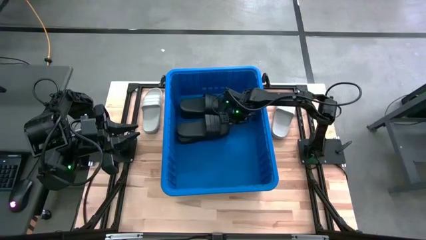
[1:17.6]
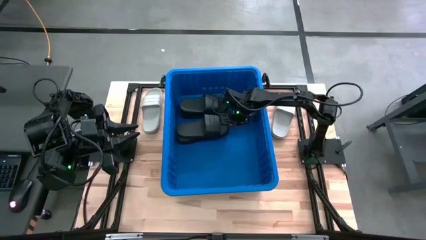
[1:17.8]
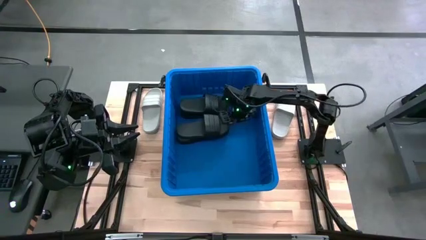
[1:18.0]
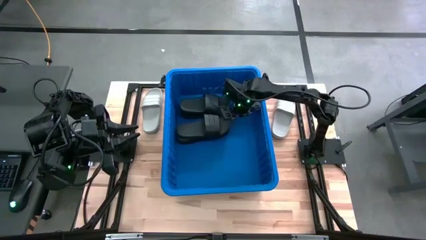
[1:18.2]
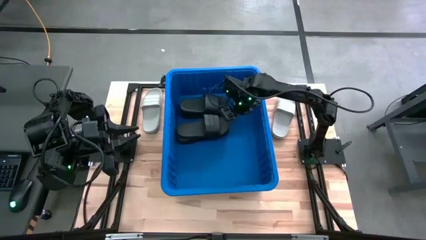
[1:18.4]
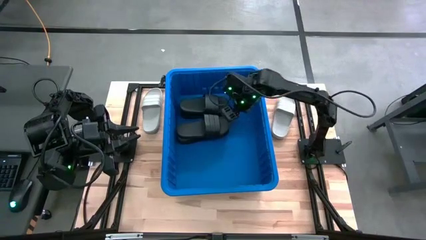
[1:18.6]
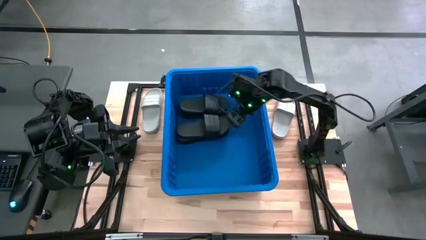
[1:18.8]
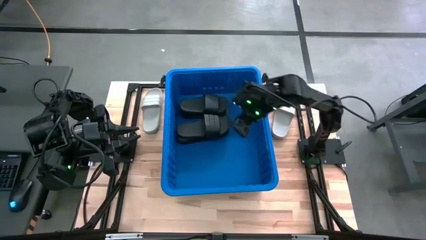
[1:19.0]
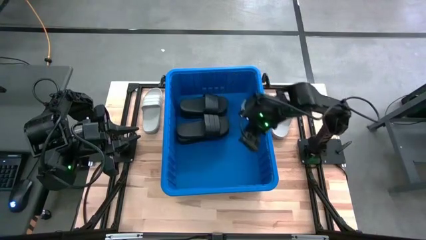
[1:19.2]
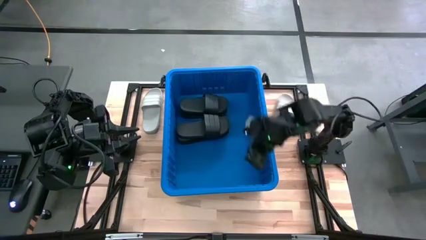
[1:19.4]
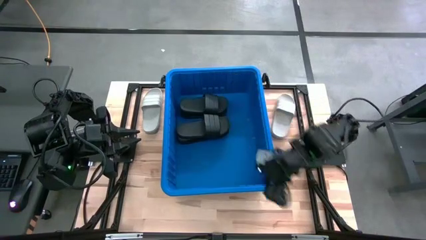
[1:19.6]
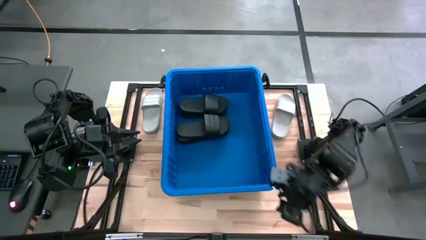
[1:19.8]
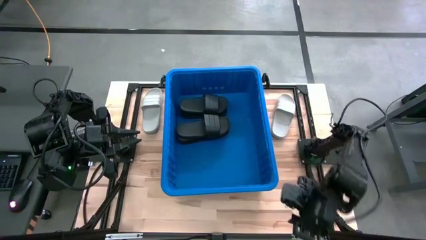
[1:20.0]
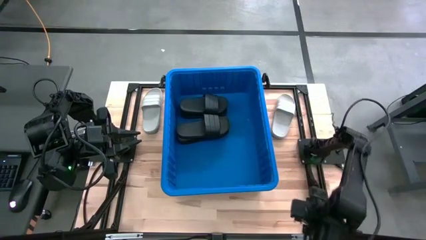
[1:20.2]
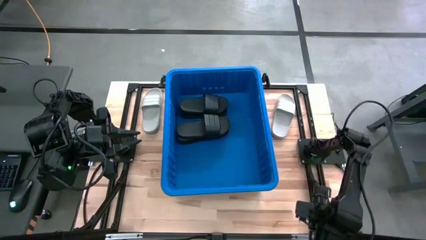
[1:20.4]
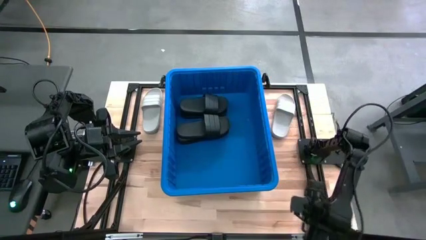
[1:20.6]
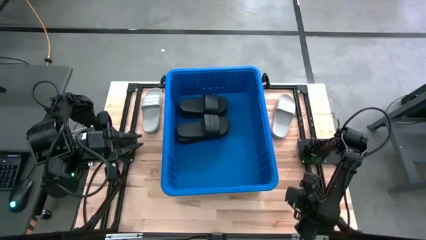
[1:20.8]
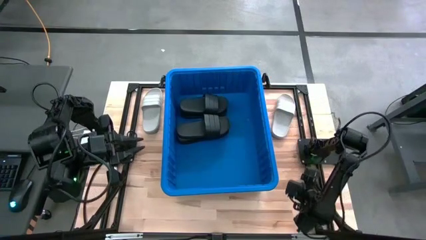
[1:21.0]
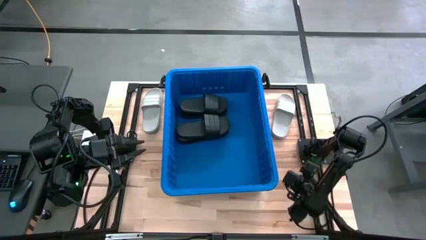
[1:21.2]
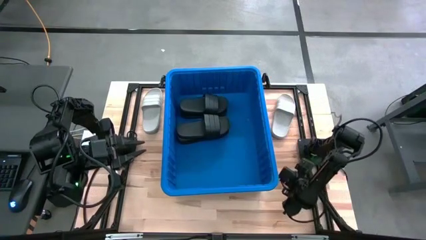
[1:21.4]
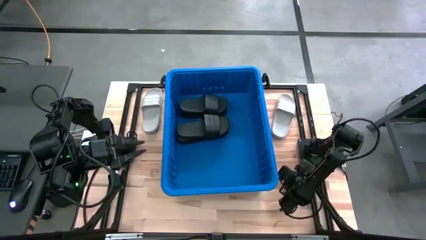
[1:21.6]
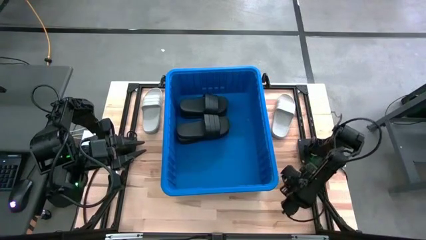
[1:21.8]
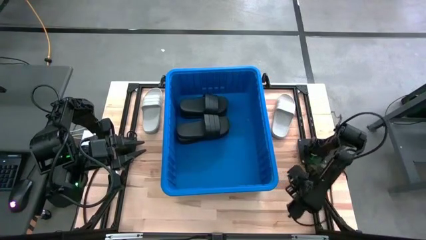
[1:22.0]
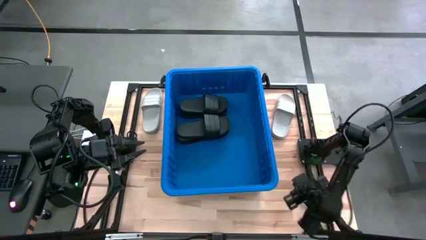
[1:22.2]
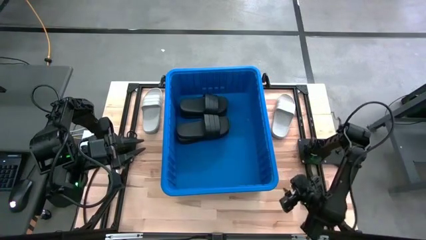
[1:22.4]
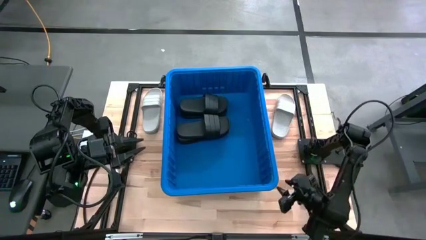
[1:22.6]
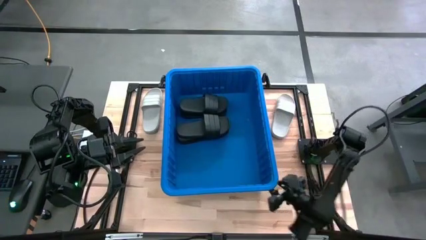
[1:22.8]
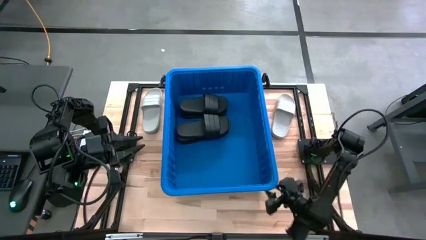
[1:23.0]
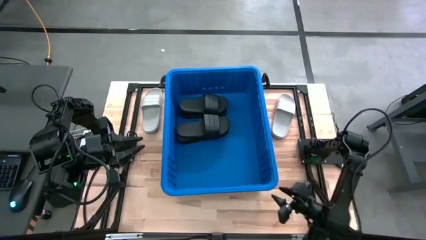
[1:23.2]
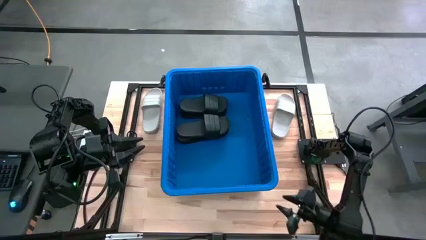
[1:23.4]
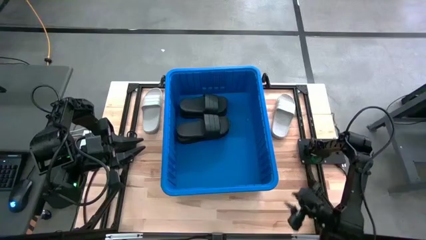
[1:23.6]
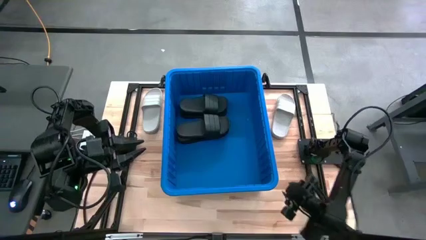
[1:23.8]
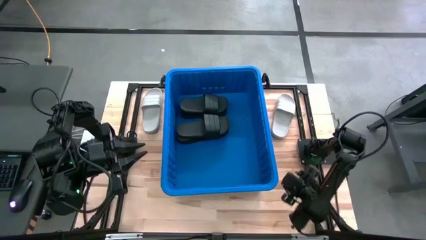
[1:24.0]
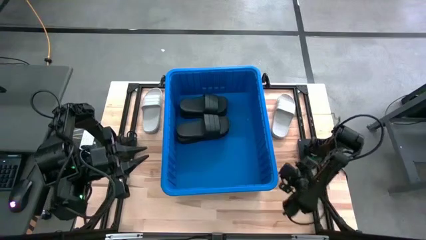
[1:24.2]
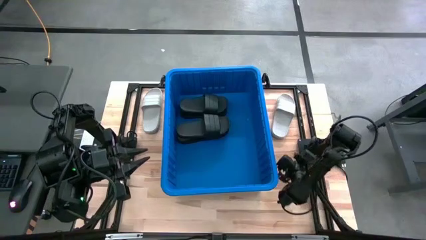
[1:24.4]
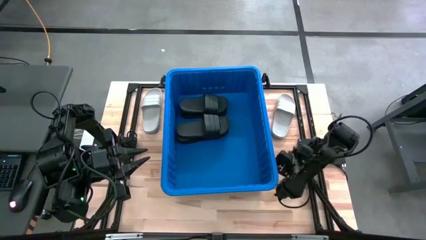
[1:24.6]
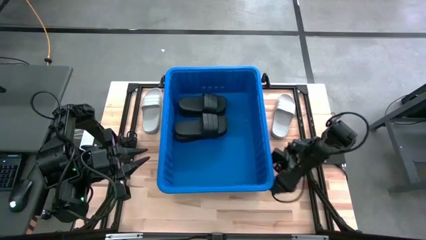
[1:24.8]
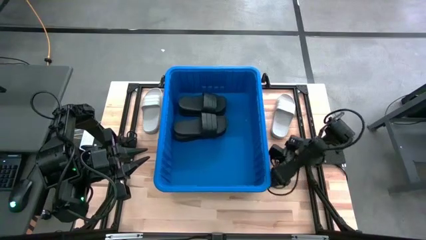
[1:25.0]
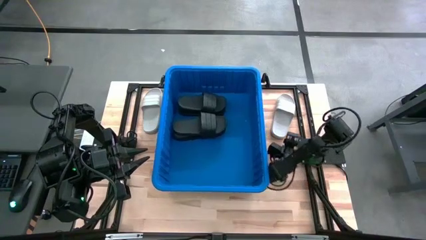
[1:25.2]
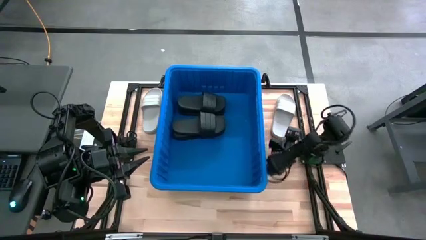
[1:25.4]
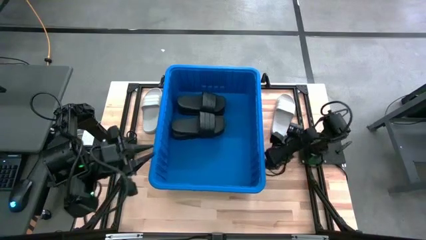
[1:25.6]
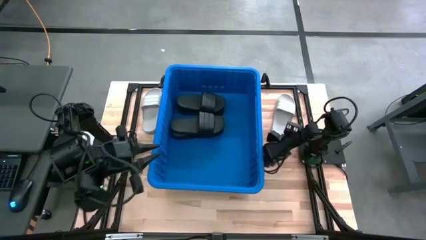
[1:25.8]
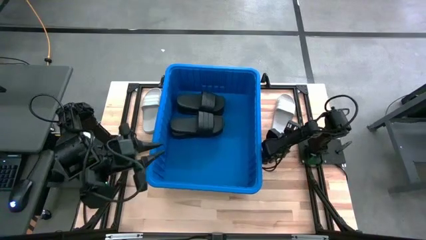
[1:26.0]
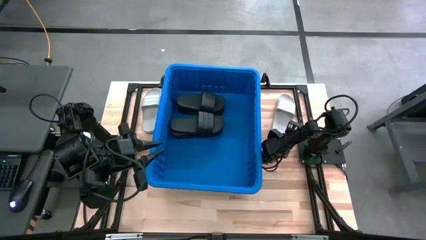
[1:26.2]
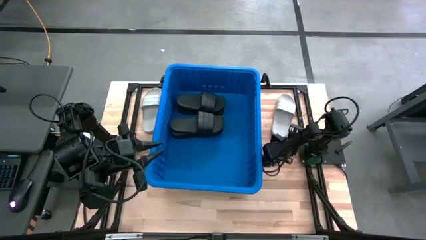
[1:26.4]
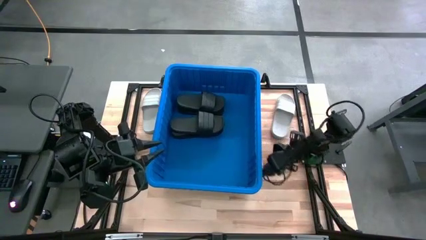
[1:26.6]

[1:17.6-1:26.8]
Task: Pick and place slides into bin
Adjust the bin

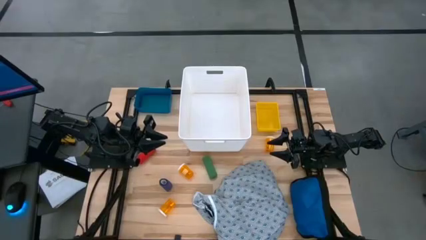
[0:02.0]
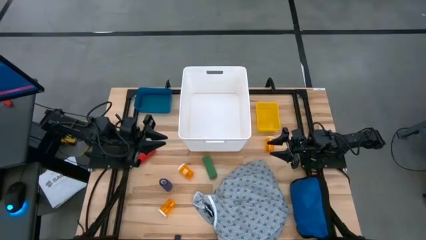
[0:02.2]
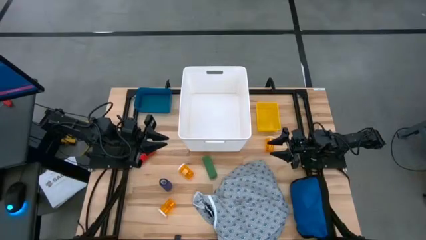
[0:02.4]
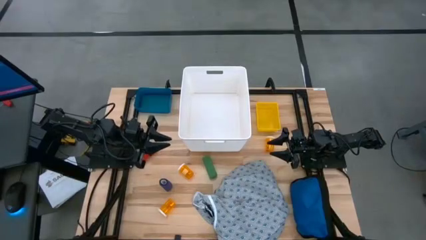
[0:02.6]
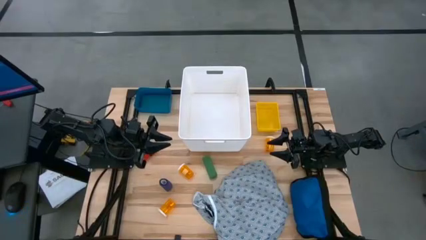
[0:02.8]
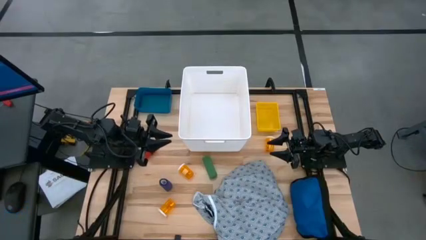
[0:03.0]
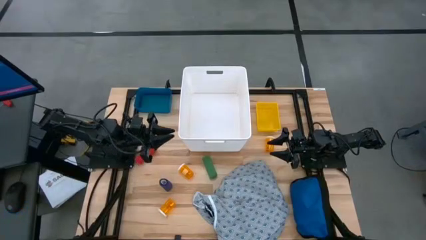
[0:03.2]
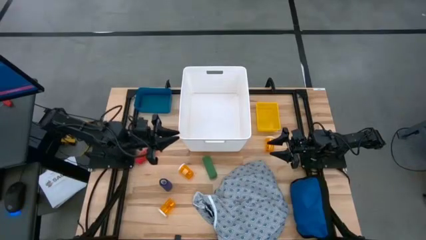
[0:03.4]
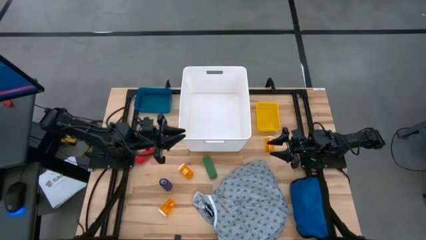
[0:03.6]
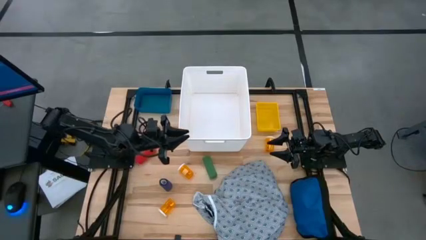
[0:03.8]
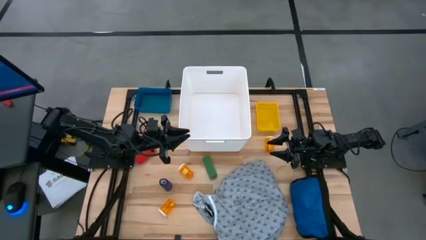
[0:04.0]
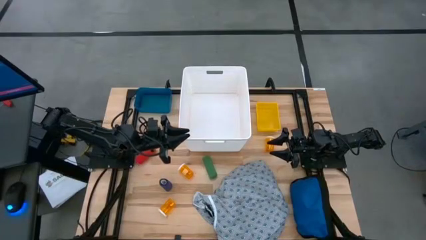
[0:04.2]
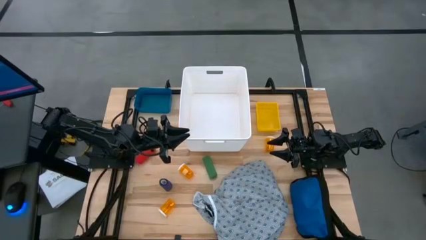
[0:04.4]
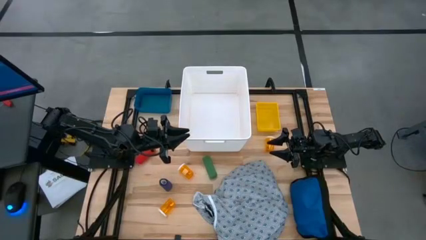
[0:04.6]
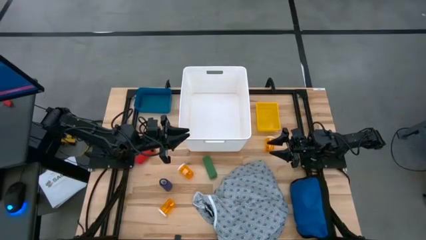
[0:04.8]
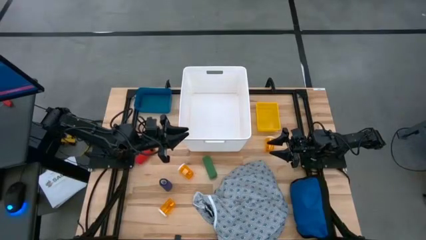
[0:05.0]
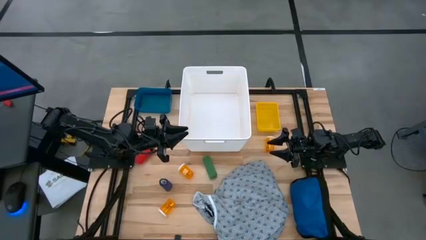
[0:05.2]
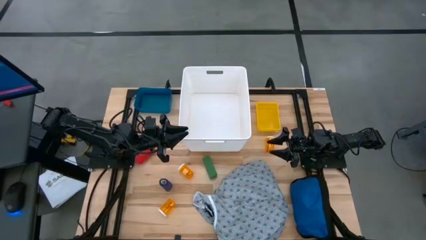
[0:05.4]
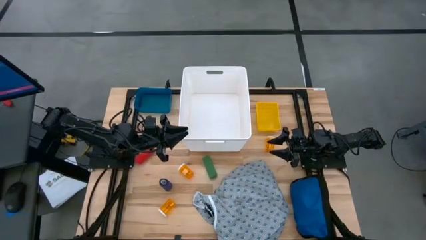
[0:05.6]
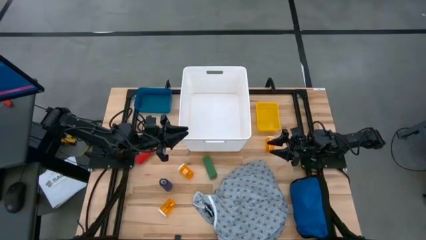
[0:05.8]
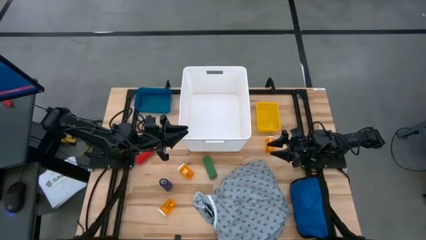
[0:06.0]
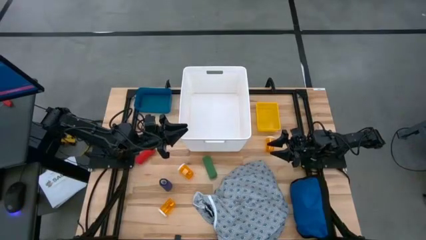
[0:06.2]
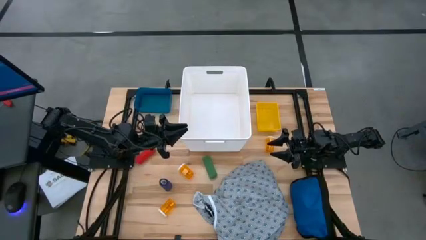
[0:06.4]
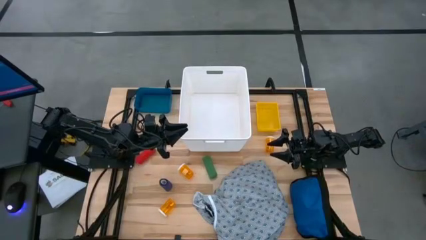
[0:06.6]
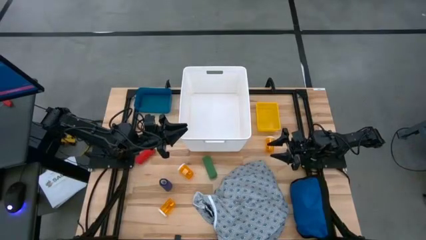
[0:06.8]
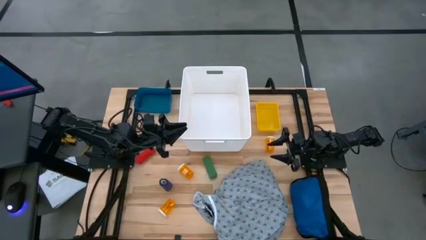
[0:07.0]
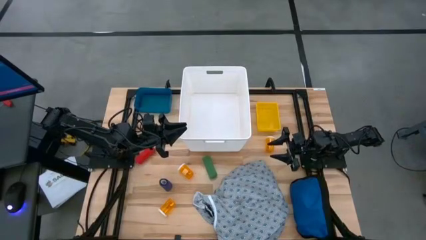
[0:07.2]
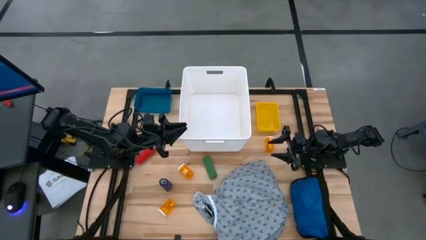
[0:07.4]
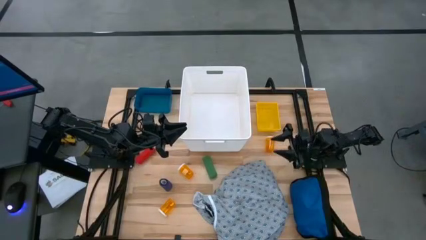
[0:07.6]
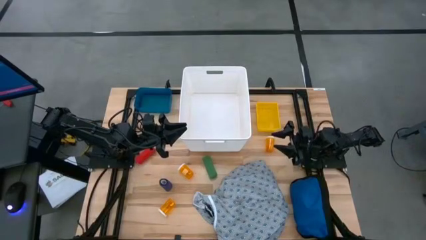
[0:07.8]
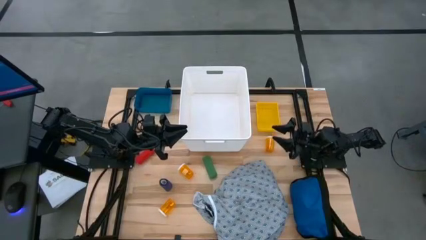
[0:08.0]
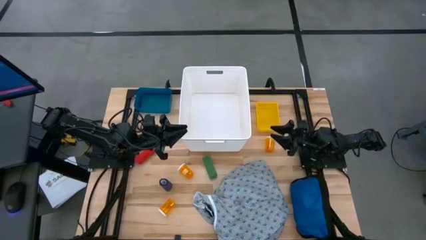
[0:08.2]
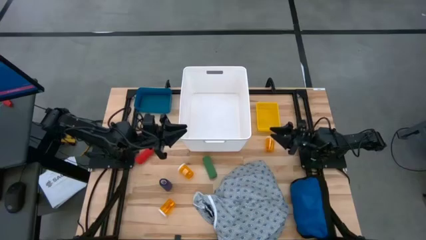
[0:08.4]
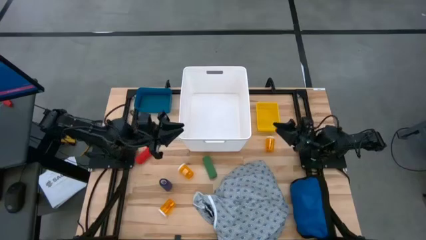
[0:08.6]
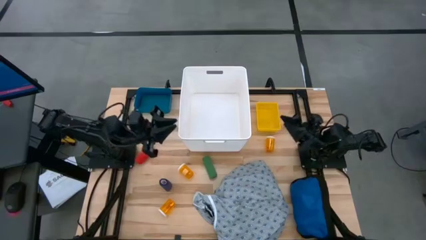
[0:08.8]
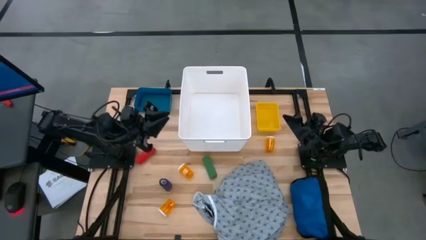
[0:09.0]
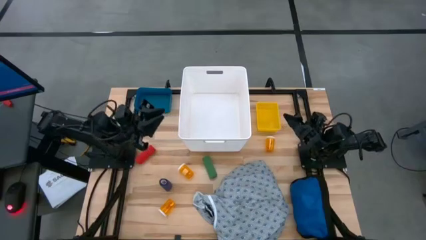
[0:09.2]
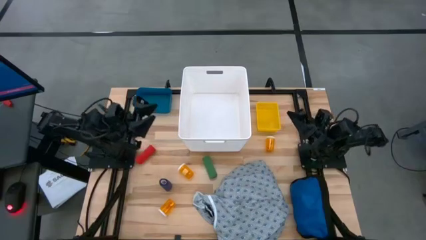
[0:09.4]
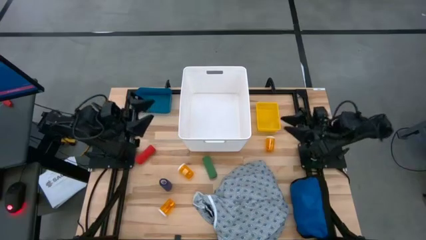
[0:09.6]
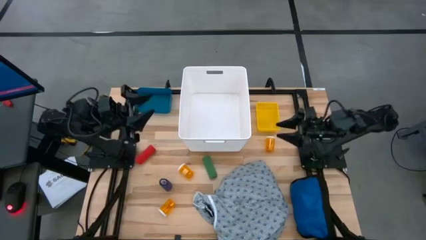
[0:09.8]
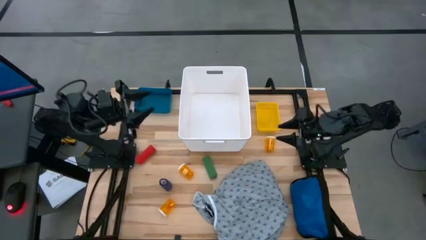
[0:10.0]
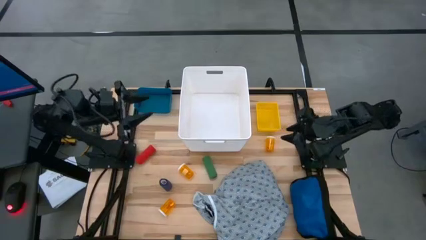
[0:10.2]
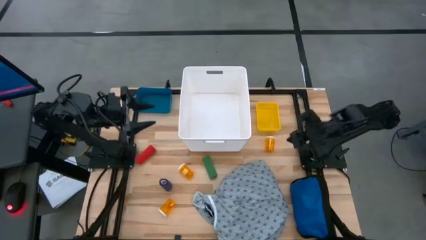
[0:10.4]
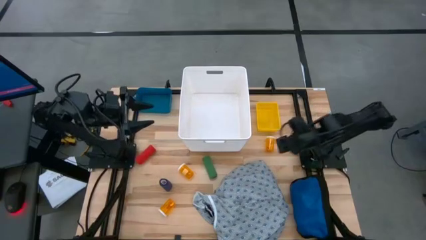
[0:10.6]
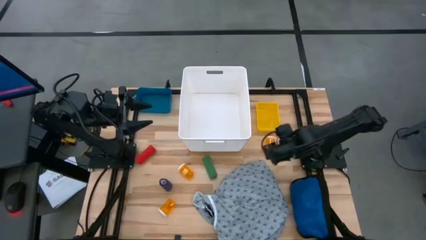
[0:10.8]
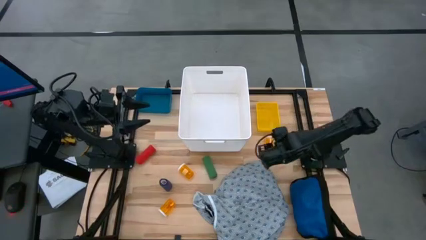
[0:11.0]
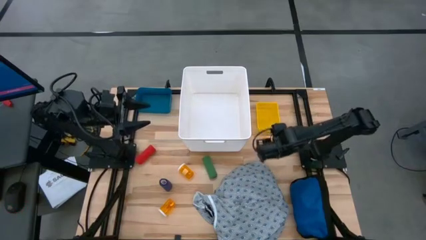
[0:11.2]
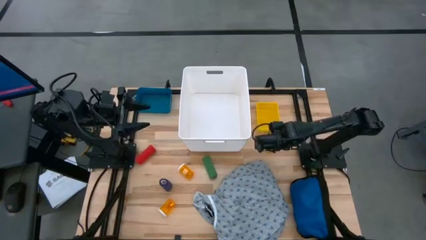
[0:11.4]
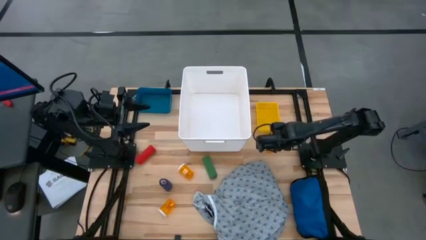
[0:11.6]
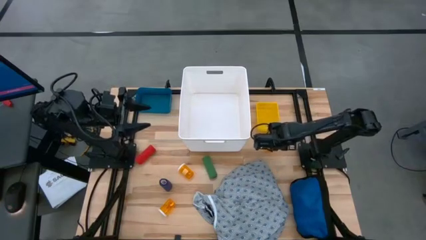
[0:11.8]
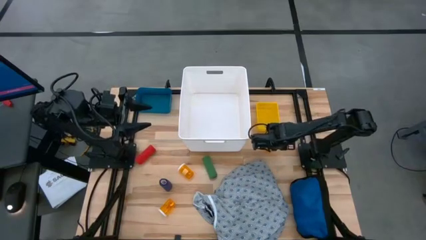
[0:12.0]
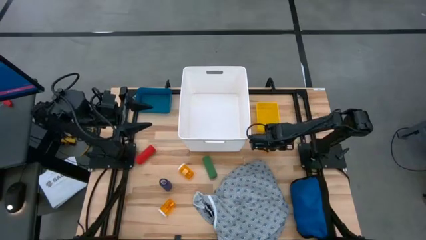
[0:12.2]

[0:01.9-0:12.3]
Task: Pick & place medical supplies in basket/bin
Put the top orange pill bottle into the yellow bin
